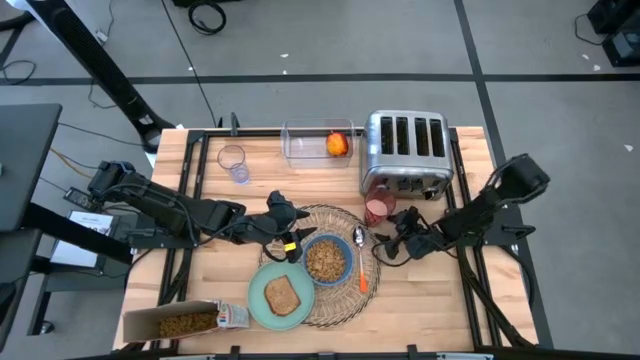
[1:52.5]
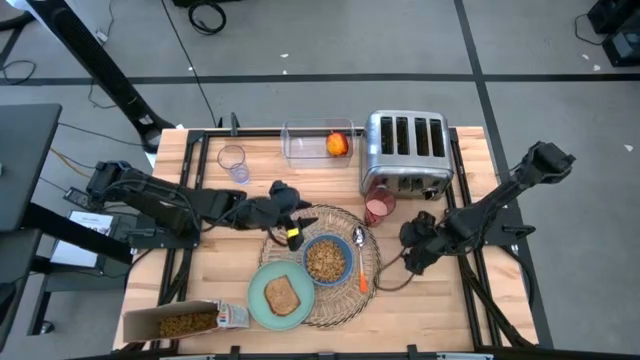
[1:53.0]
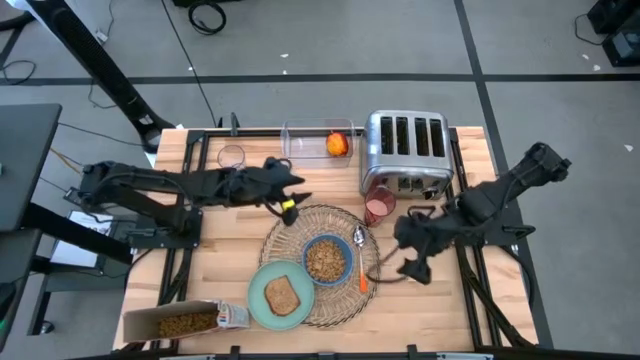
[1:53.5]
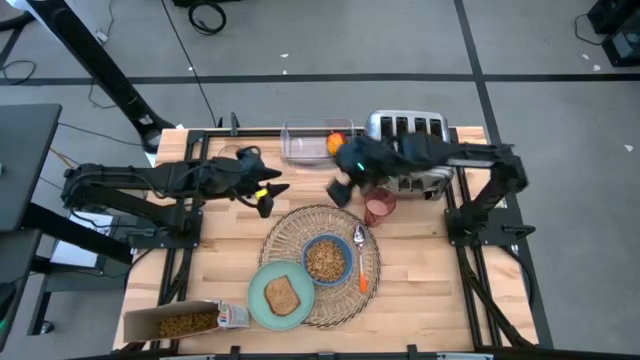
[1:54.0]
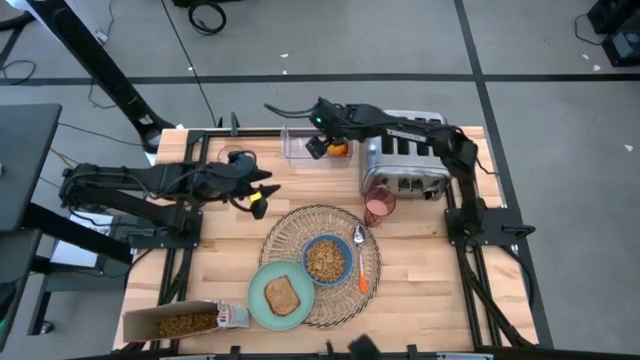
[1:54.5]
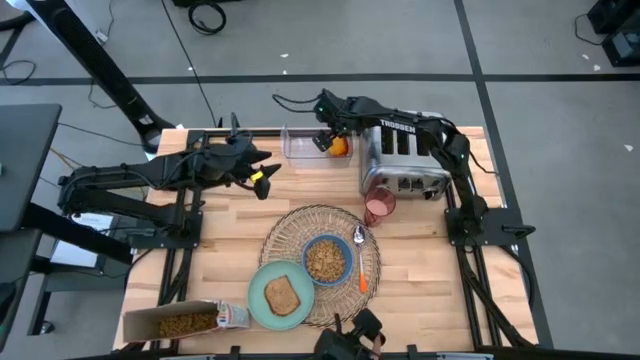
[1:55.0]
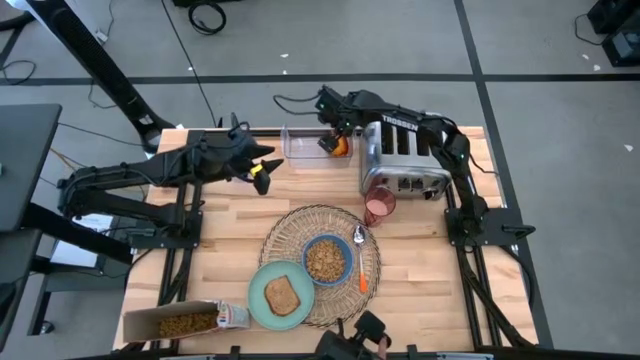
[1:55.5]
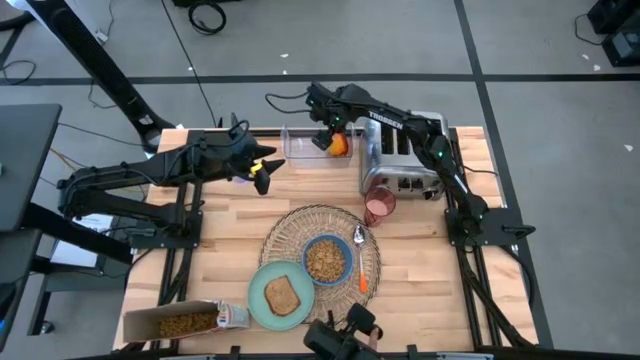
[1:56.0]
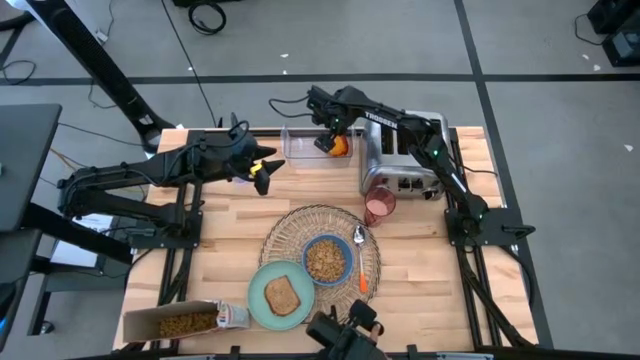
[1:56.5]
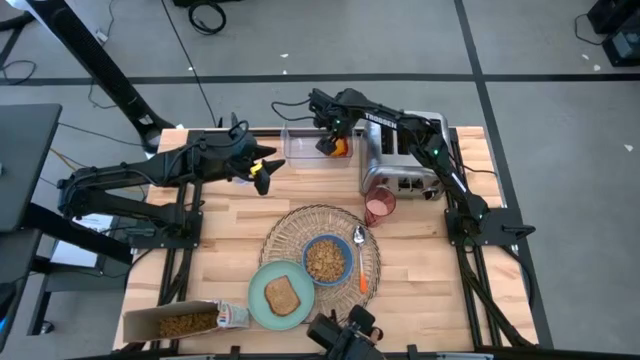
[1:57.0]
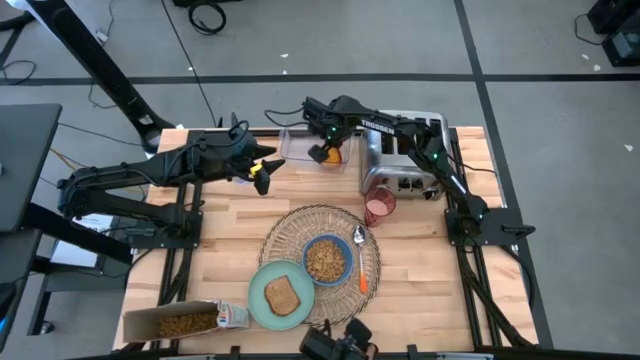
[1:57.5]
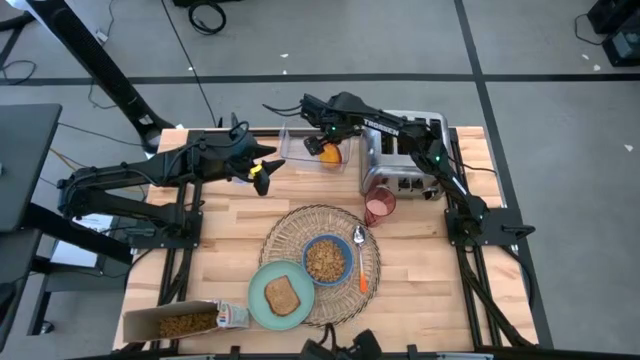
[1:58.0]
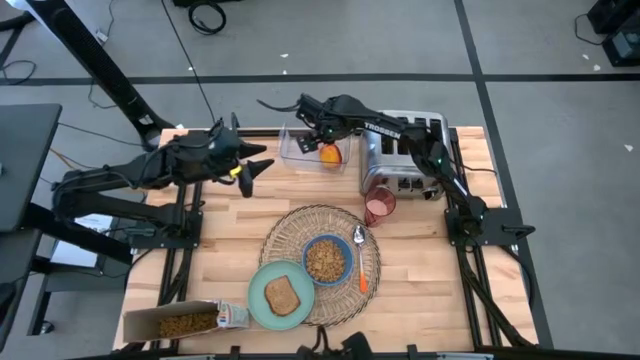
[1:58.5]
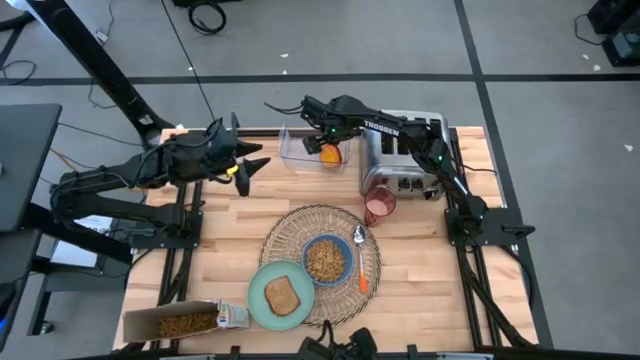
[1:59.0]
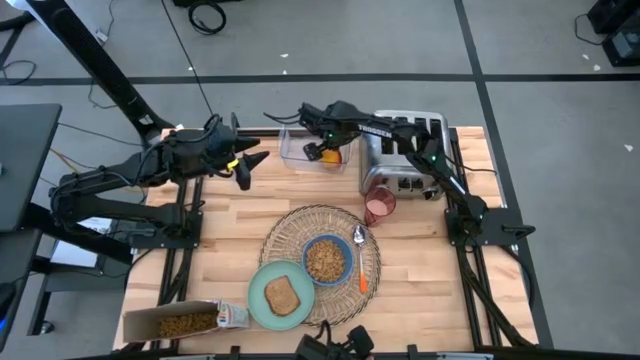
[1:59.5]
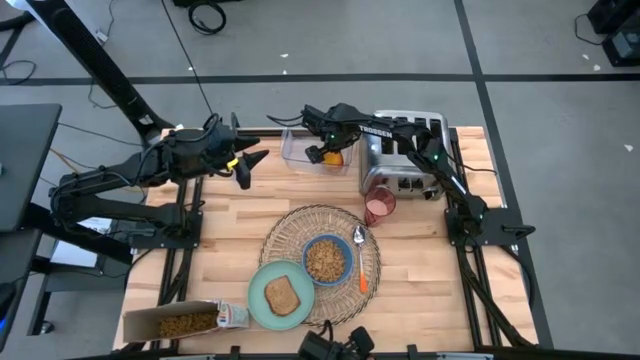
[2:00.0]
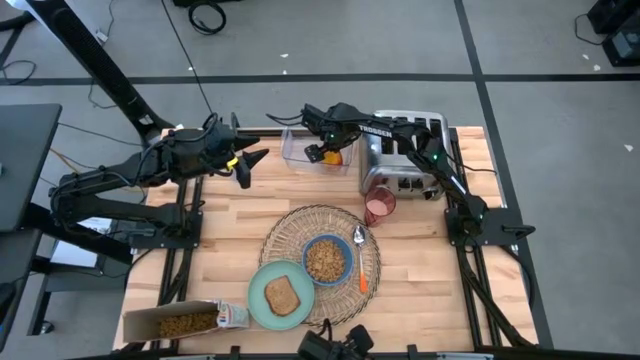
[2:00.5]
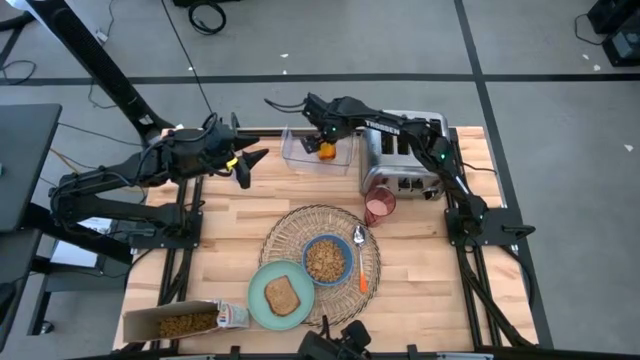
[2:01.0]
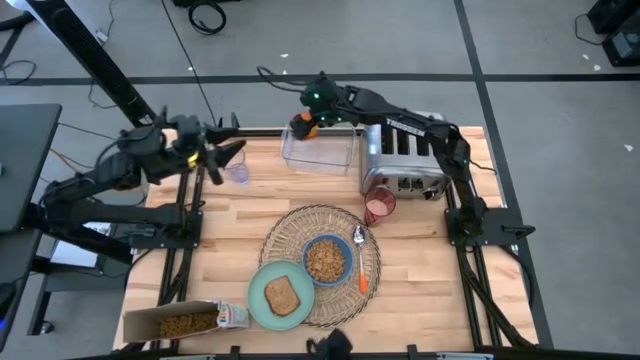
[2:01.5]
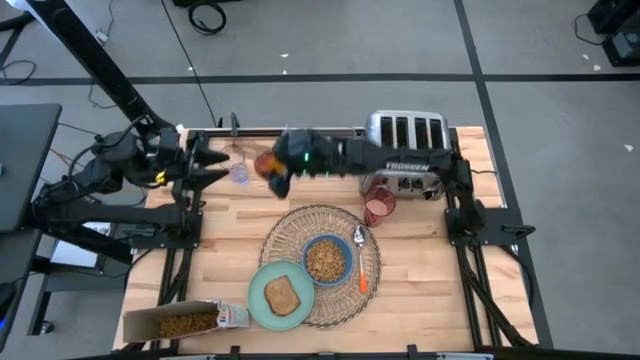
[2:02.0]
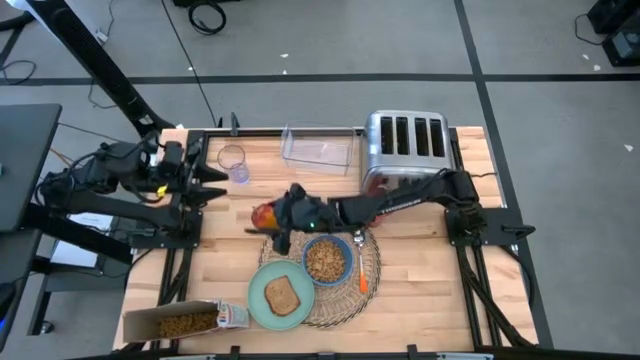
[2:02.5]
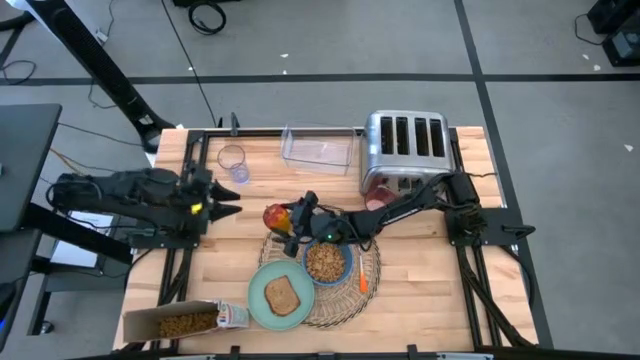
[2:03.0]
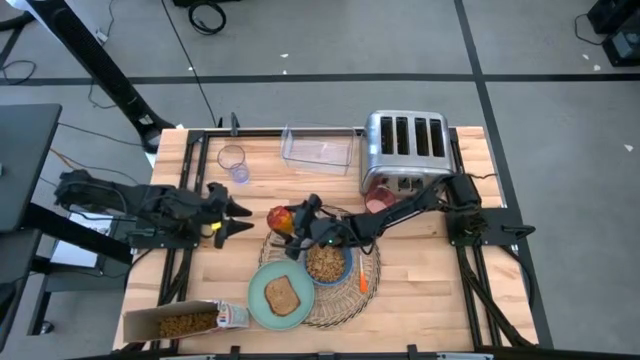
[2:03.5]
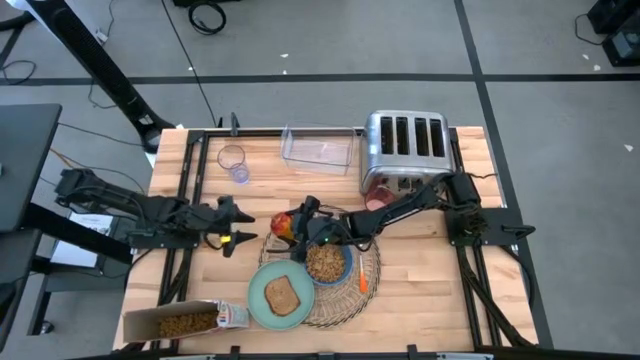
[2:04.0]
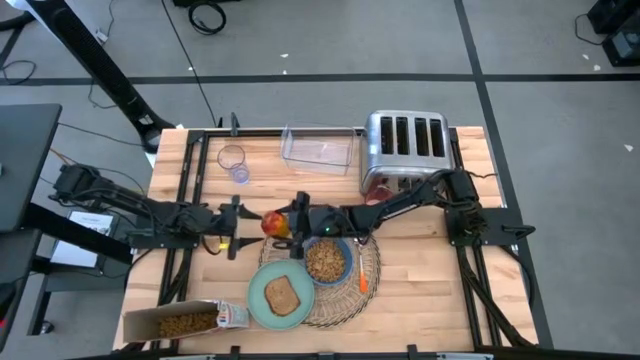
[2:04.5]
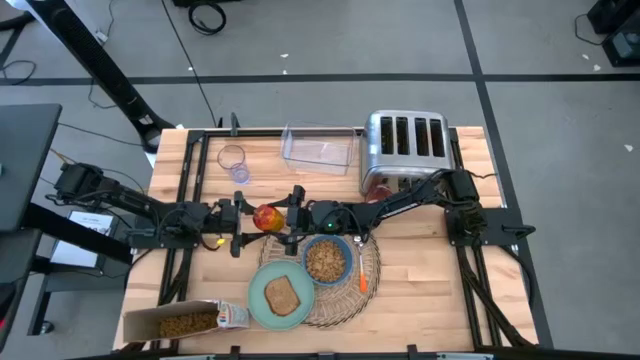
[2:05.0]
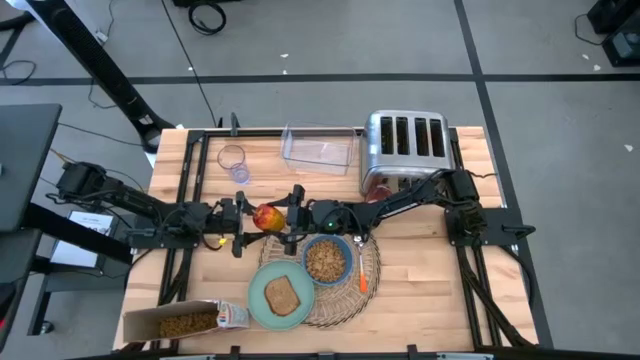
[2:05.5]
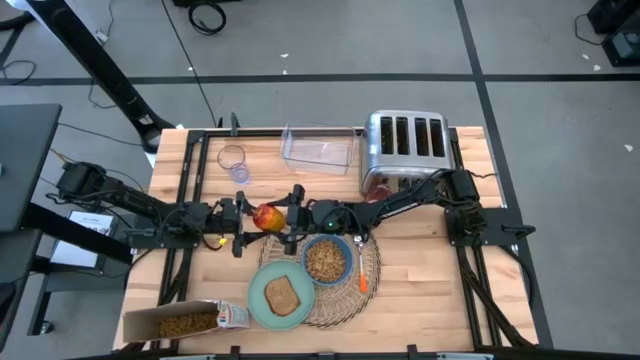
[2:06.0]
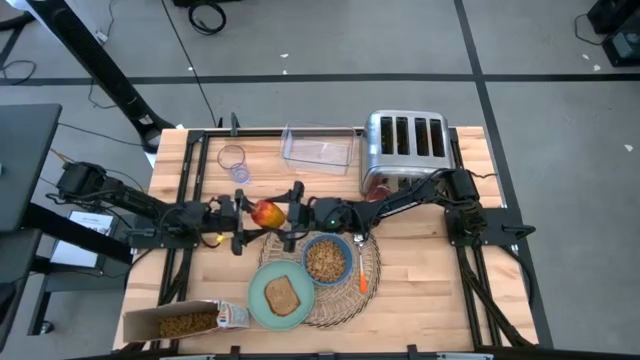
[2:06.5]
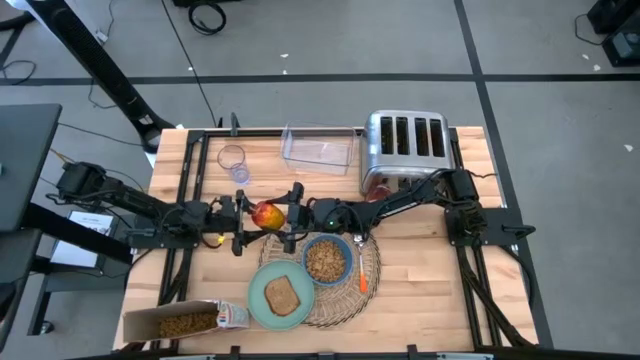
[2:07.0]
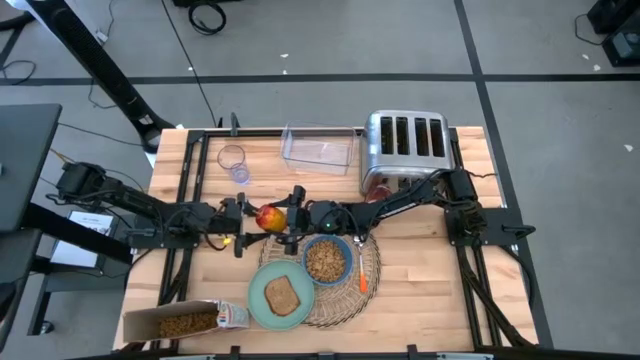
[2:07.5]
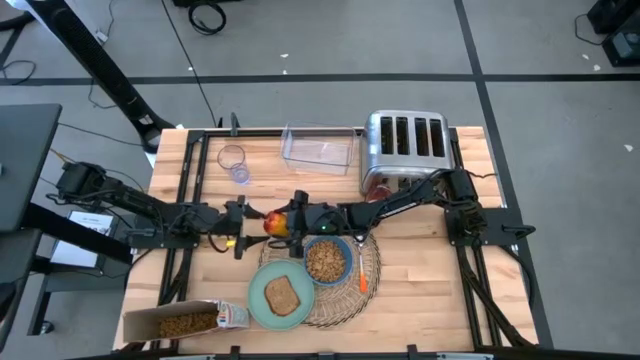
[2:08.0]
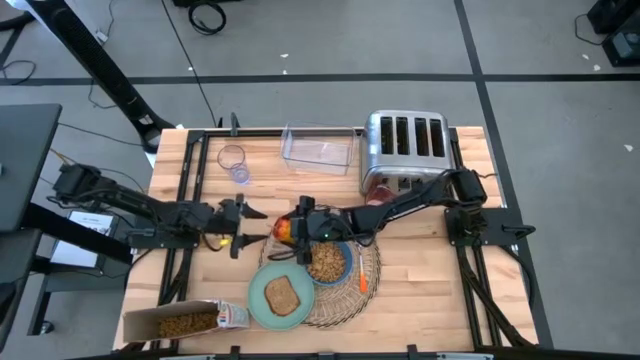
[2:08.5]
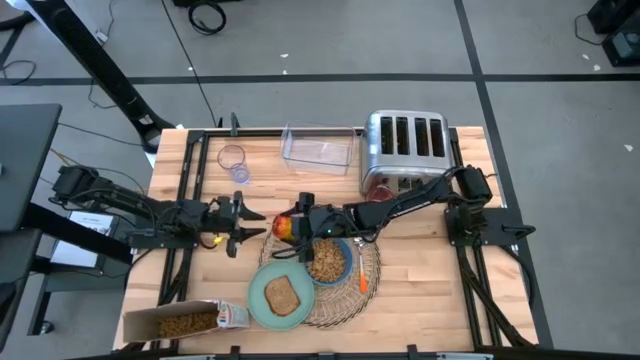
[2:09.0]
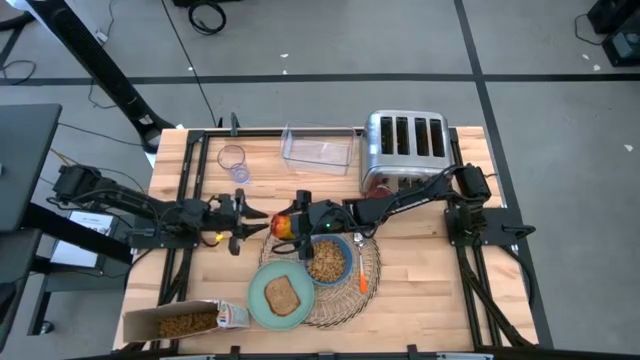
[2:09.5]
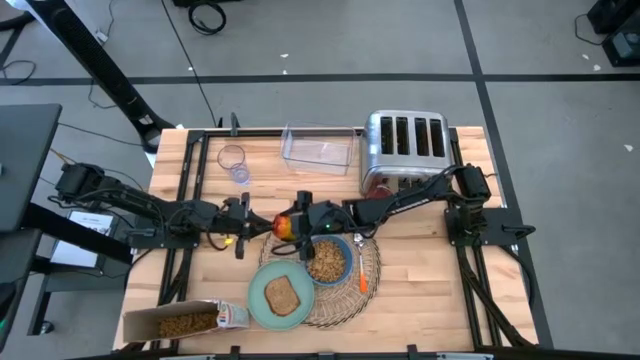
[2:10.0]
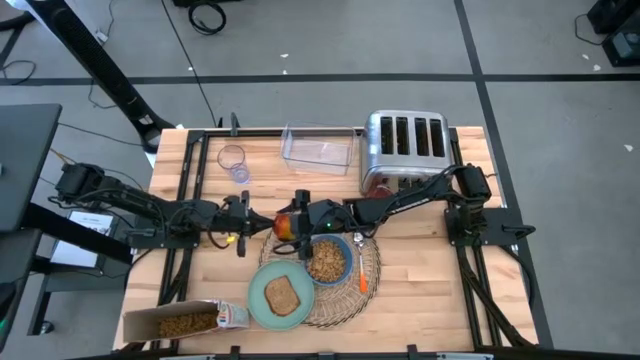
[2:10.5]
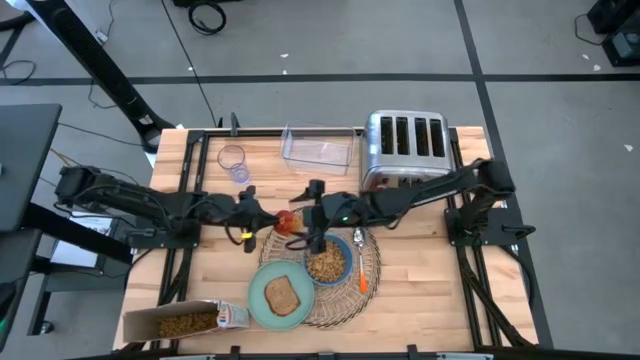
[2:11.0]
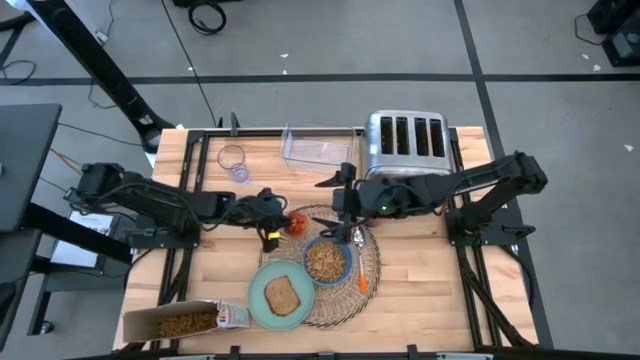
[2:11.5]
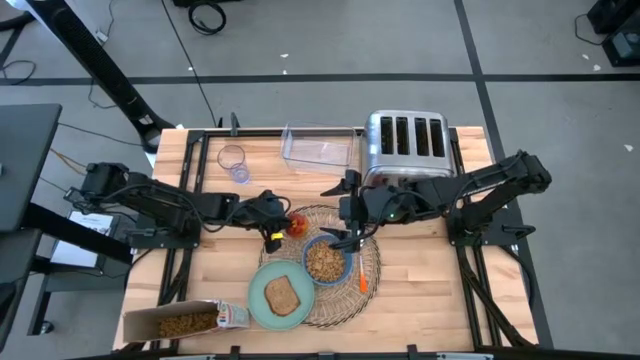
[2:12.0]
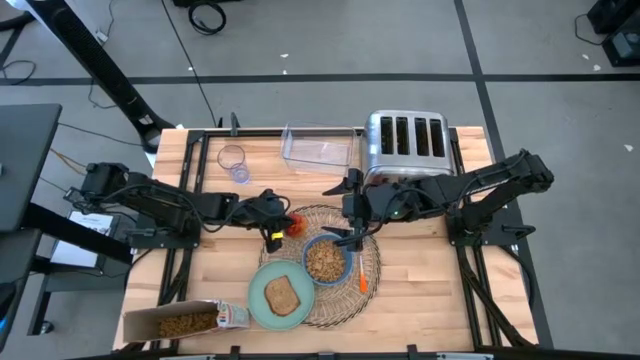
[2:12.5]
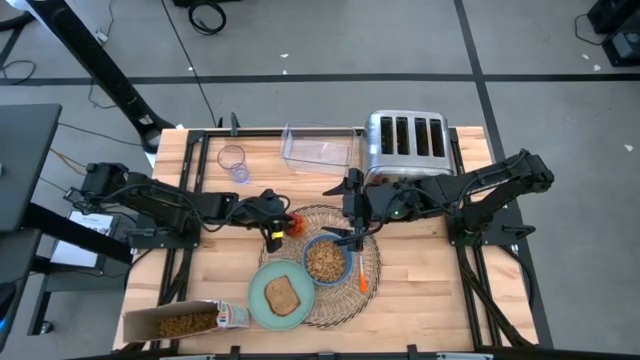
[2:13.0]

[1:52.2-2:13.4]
Task: Arrange a breakfast setting
Put the red apple to the top right of the blue bowl on the placemat
